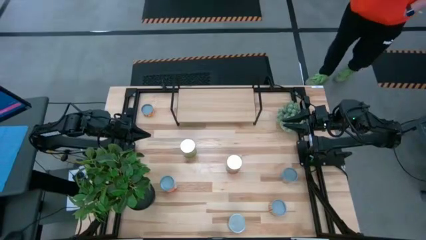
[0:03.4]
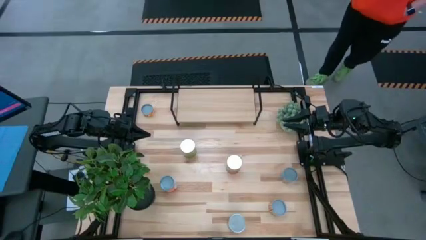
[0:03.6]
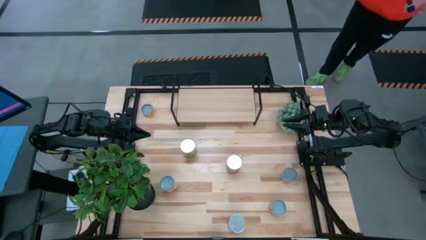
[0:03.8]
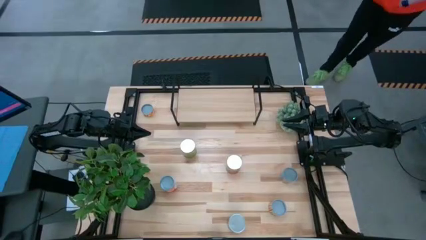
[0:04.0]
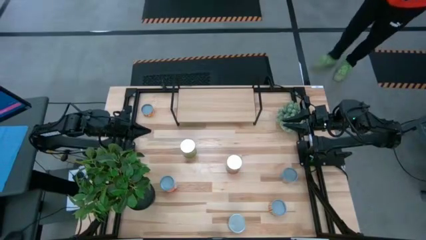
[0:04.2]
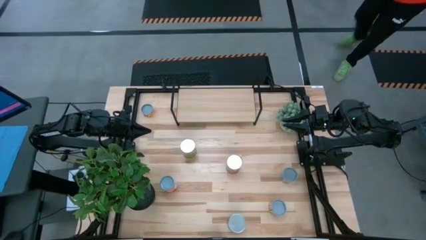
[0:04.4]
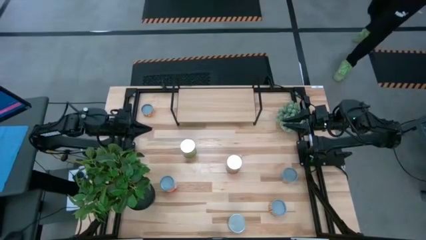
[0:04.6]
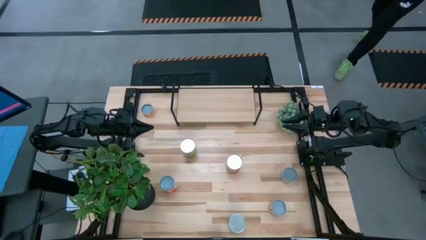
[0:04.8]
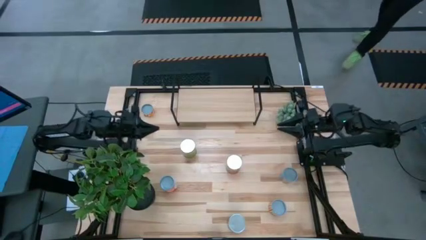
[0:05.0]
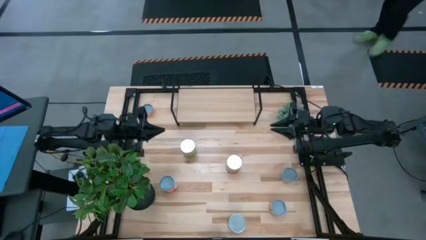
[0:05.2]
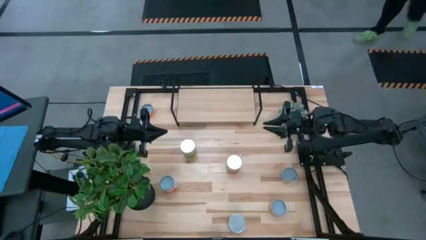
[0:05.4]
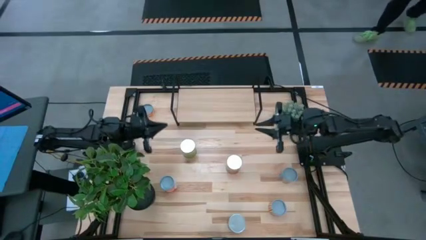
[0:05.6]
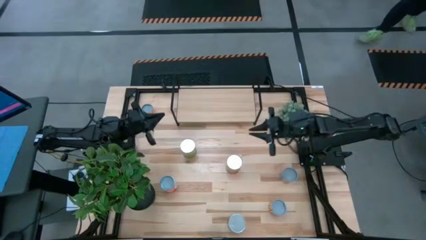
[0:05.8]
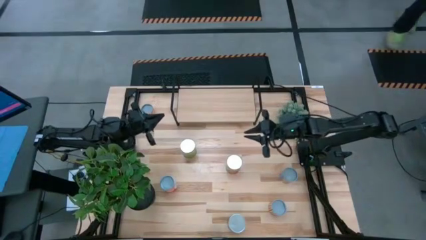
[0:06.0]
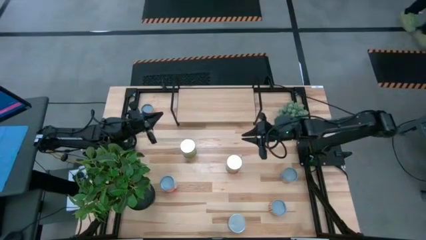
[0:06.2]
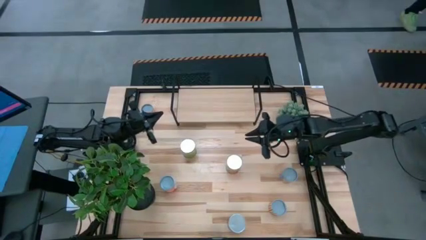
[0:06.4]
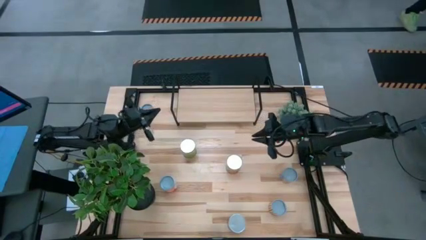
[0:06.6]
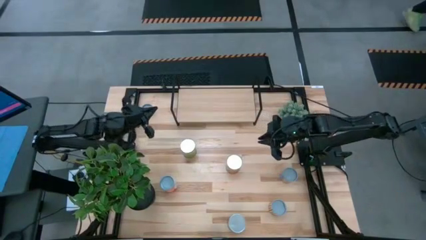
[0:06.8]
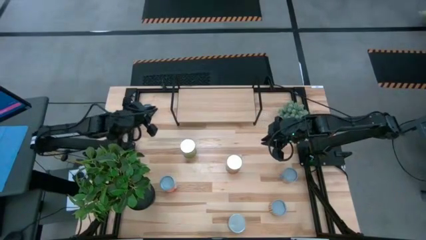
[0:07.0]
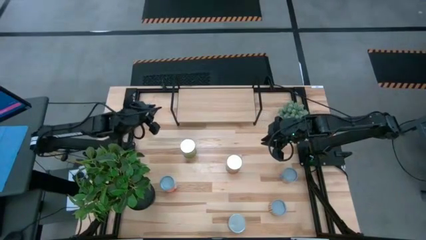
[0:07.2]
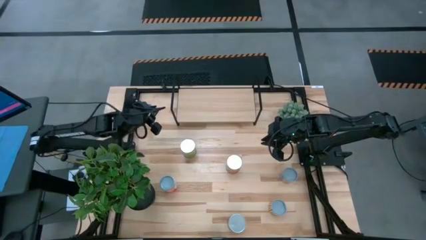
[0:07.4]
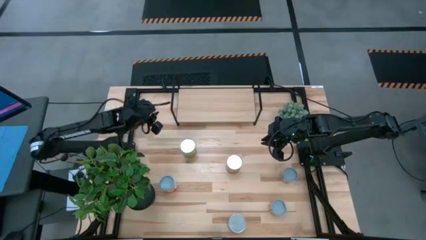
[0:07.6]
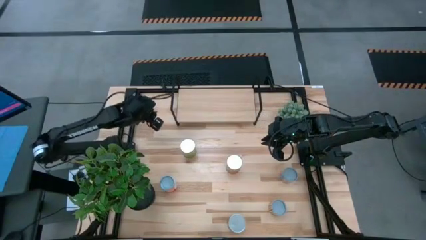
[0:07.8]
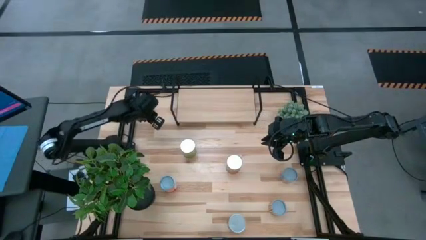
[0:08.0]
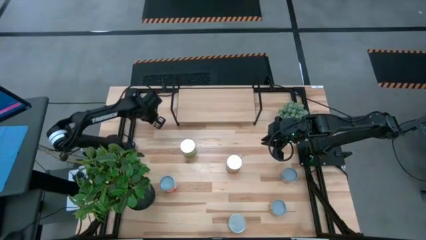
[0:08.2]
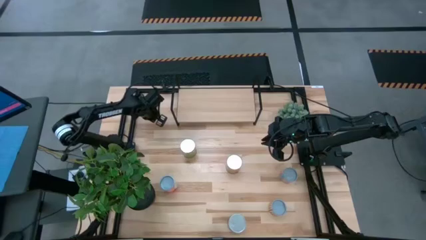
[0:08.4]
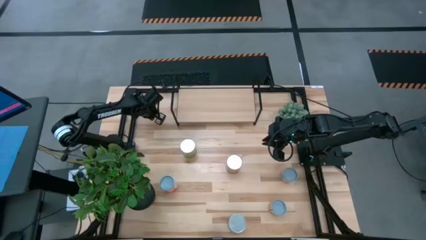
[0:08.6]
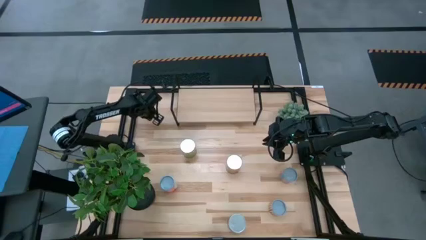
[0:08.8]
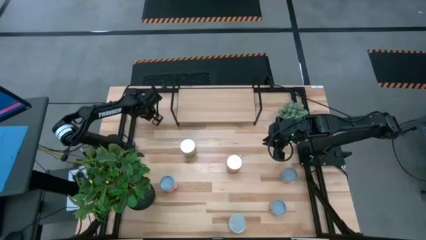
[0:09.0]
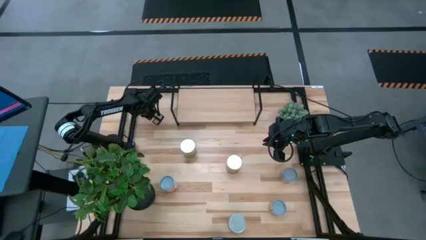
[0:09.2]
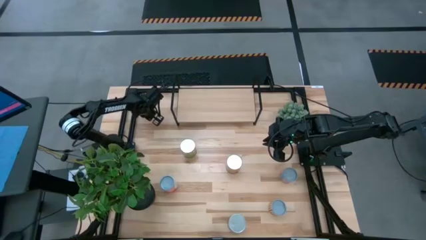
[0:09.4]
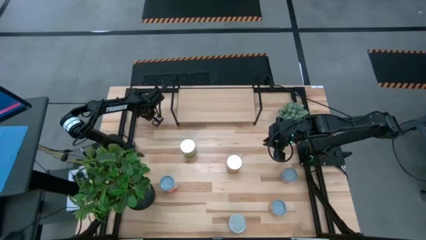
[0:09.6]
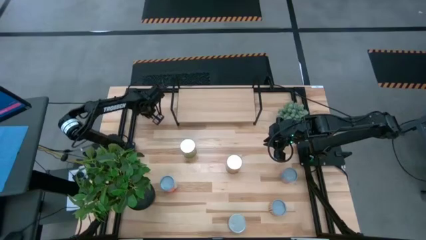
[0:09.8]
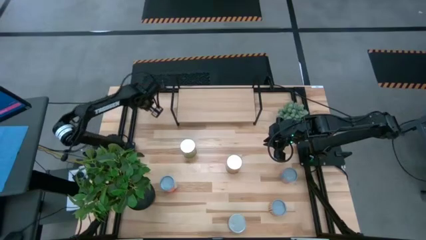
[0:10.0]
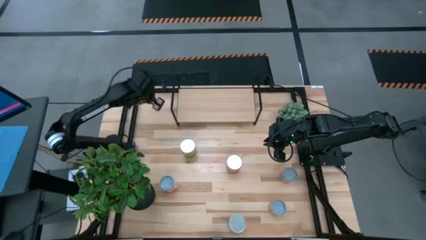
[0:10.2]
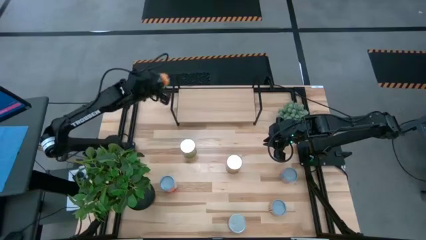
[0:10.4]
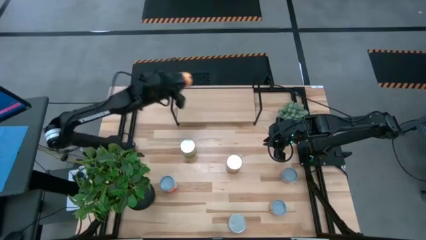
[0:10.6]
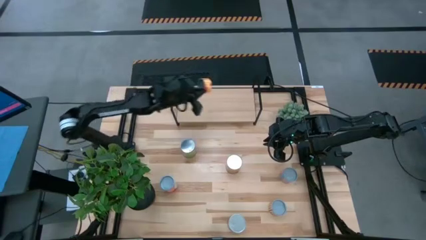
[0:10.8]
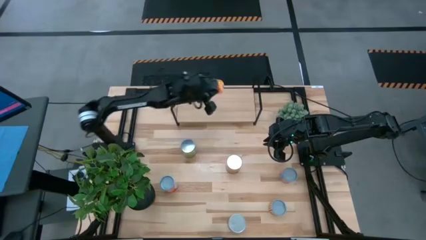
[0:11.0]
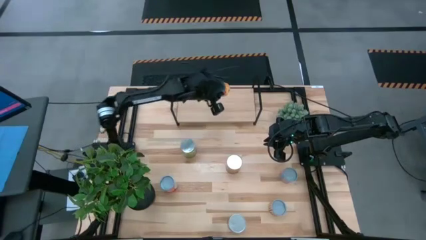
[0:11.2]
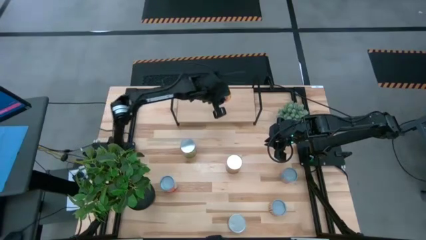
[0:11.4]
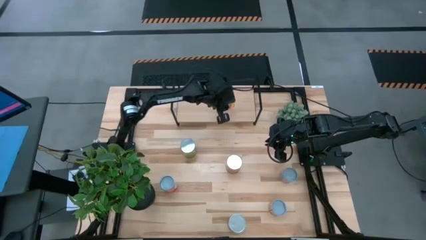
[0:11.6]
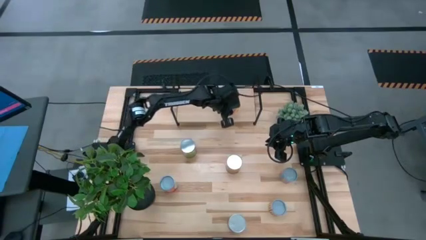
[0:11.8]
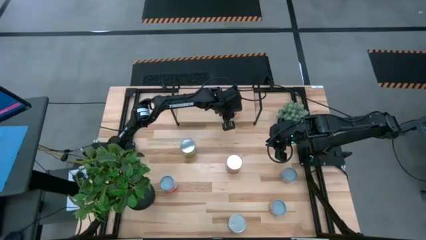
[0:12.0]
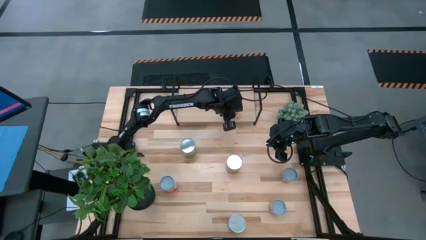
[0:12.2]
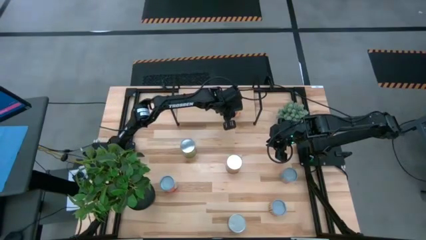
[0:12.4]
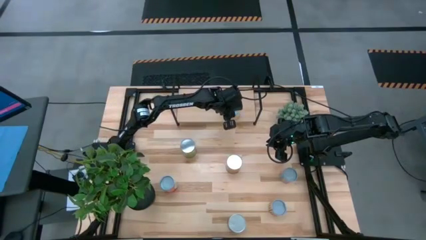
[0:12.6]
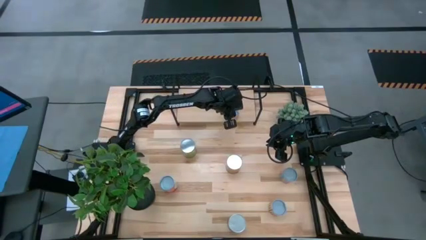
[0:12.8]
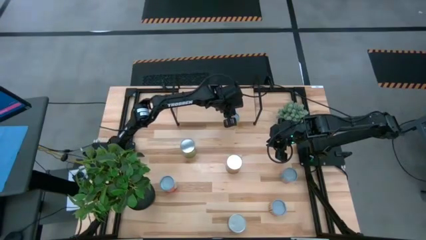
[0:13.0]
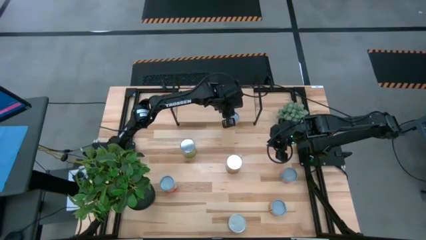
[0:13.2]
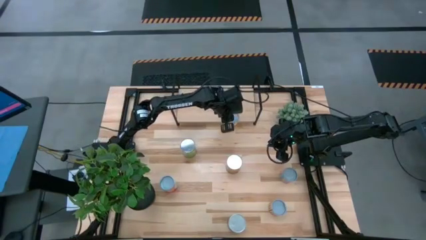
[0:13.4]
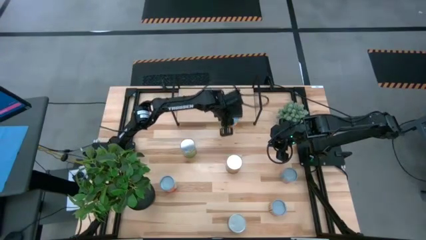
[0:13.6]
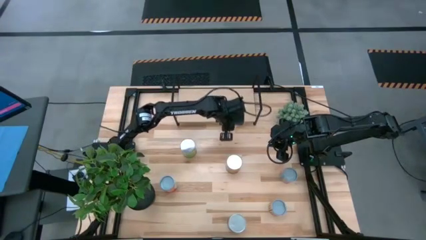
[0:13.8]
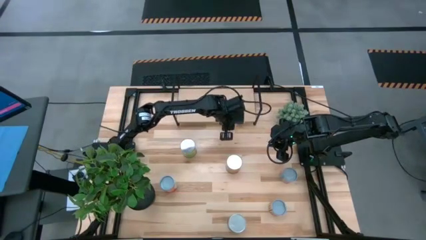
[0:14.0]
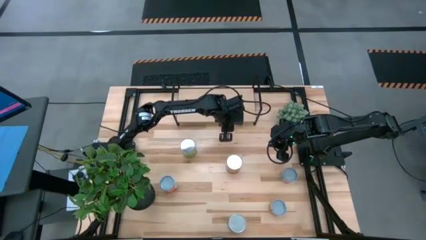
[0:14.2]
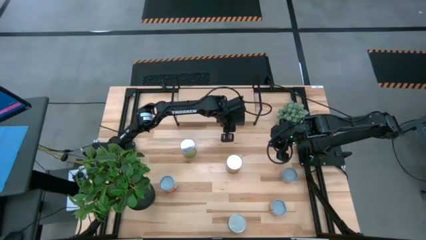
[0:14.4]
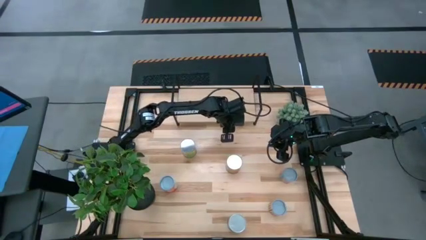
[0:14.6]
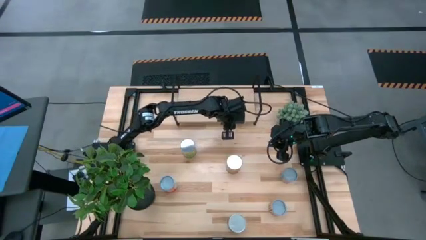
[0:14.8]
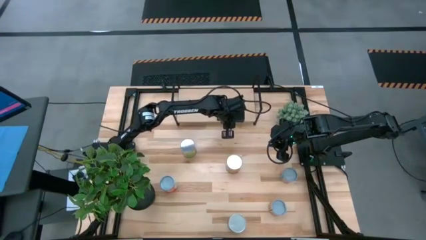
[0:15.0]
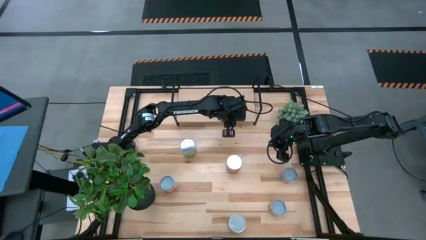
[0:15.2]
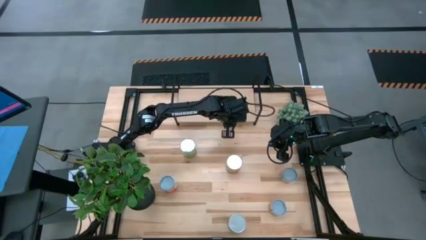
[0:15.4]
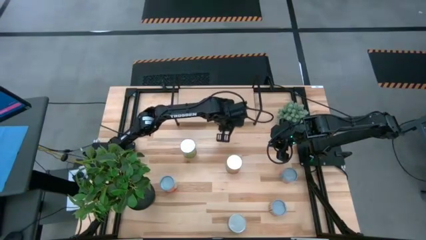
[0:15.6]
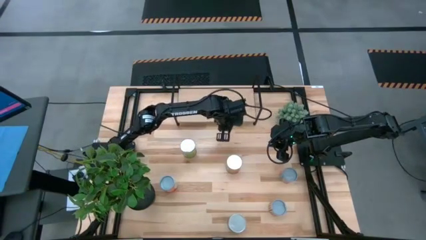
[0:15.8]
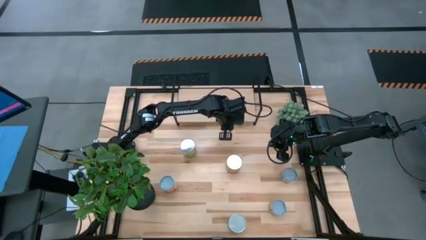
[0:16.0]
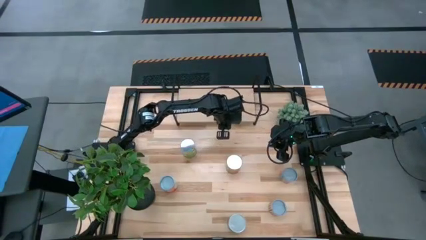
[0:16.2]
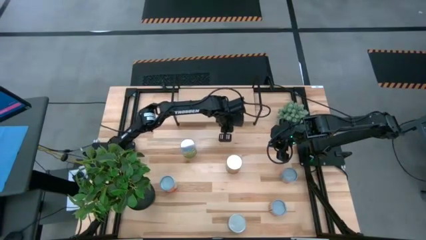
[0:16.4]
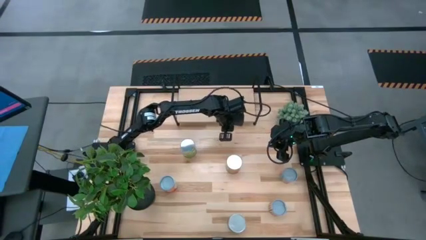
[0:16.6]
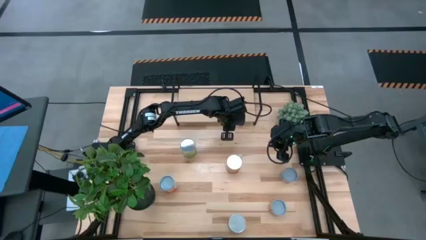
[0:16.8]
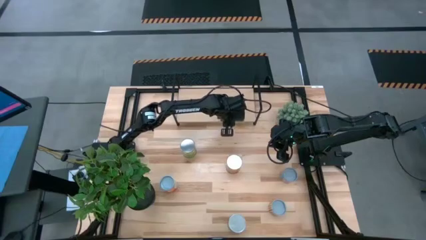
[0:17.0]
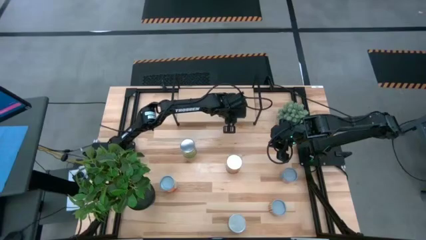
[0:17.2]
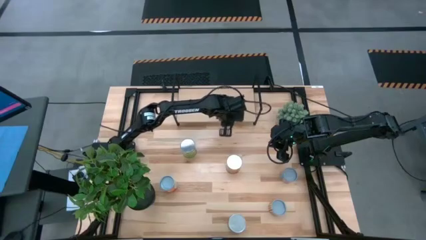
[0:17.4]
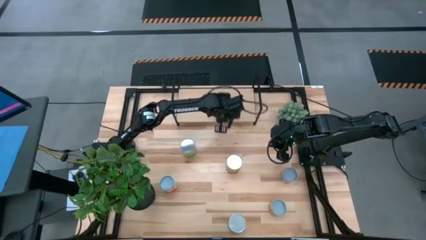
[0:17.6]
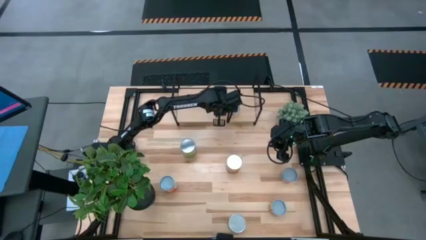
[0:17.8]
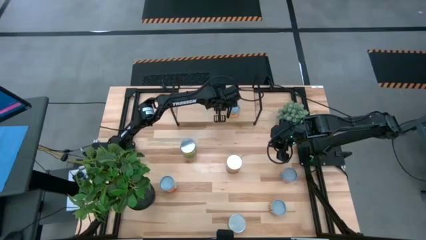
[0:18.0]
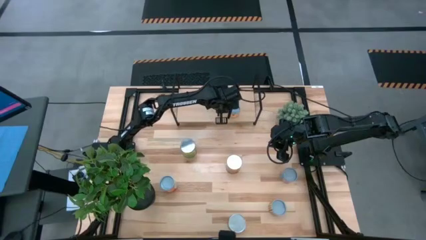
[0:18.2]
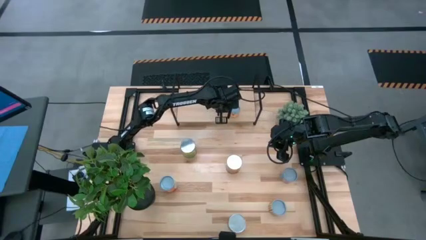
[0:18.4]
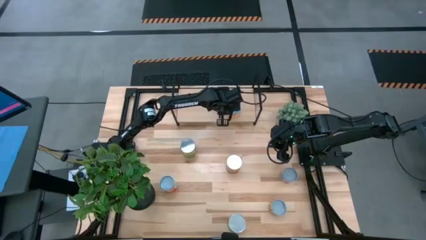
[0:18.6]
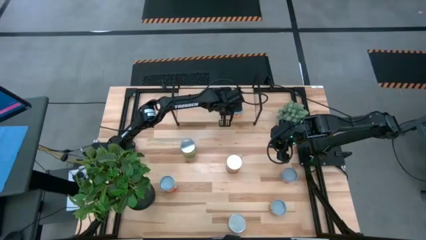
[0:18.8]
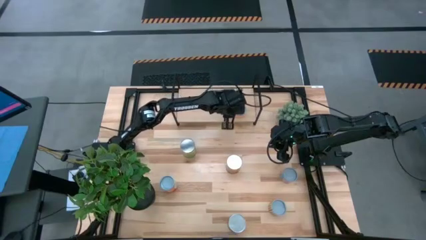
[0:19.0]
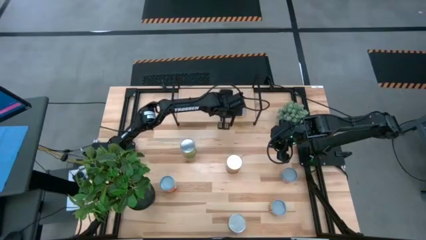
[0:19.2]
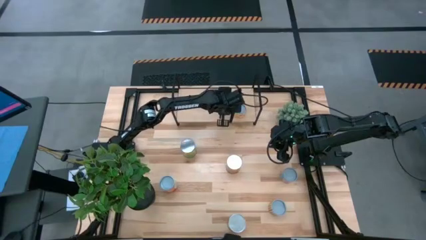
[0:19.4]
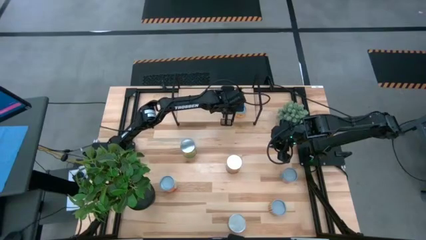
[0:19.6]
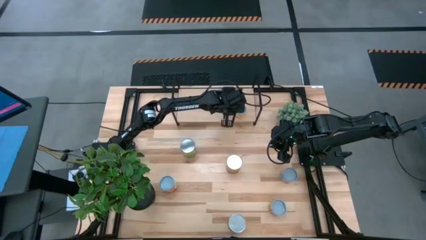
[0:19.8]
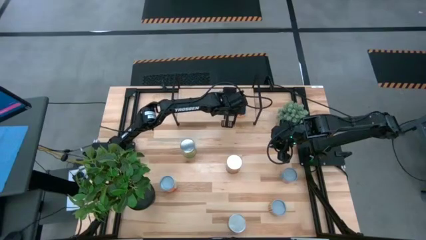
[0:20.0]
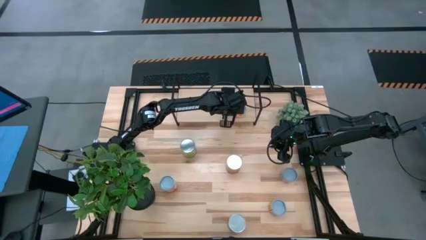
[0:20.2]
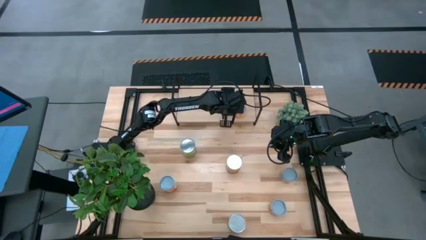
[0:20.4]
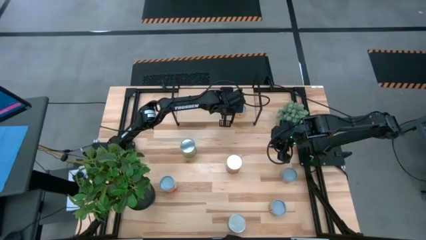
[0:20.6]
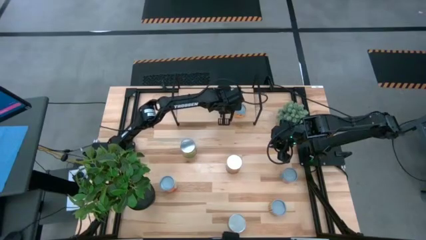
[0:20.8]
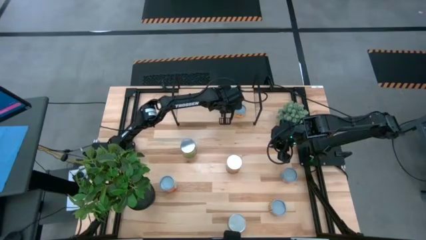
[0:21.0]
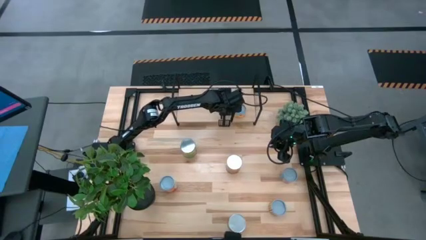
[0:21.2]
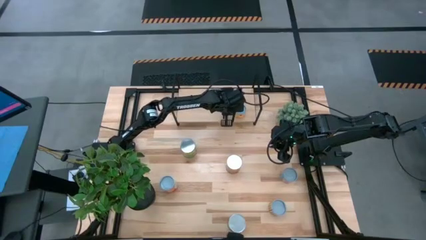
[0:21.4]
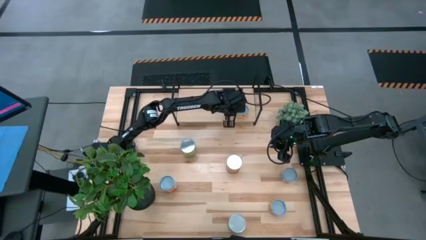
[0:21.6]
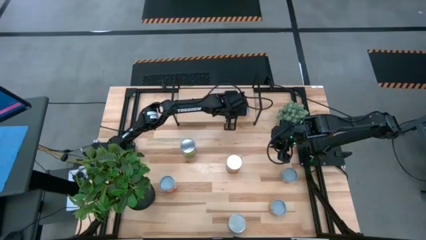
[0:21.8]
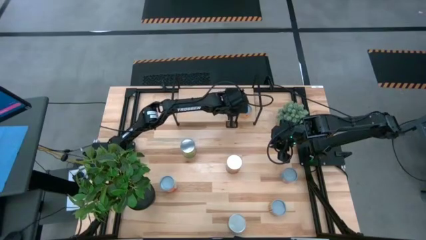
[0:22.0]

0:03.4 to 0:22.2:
Task: Pick and place cans onto a shelf
Put the canned oranges on the shelf
